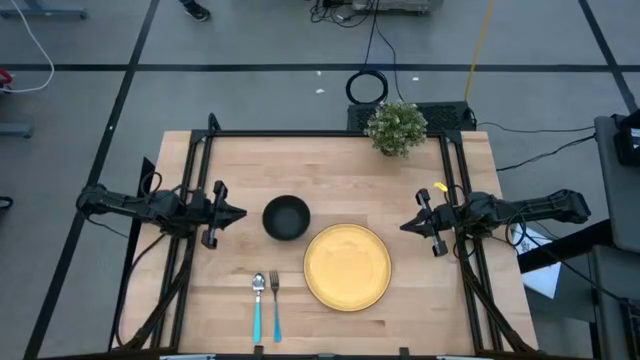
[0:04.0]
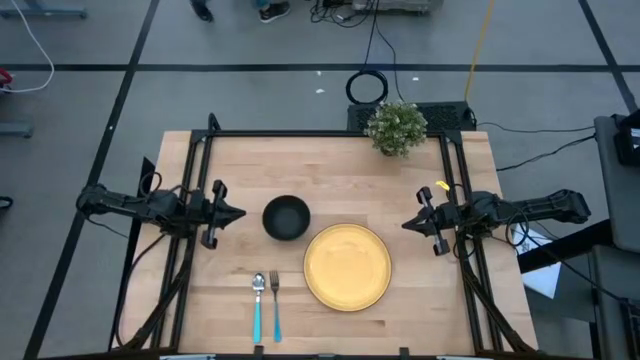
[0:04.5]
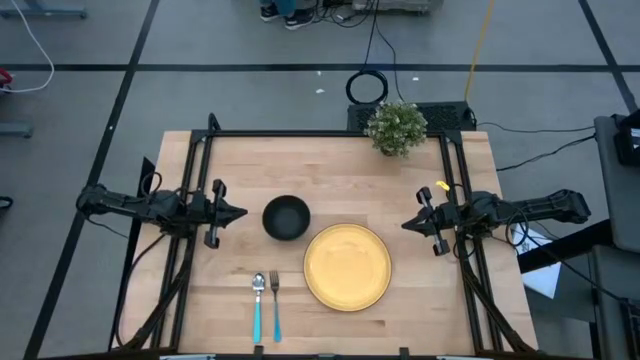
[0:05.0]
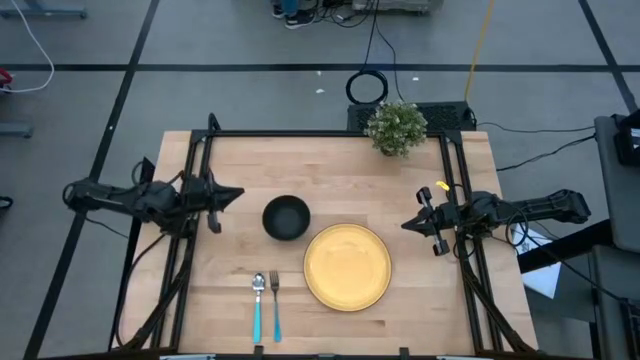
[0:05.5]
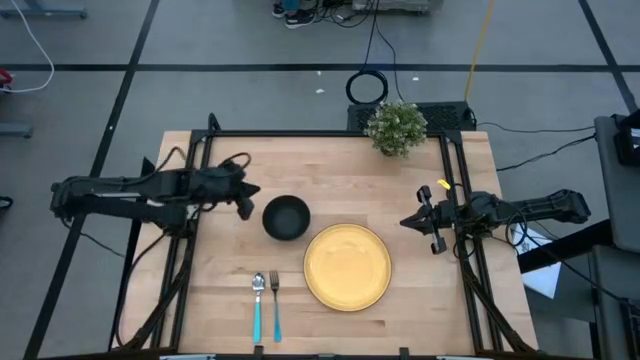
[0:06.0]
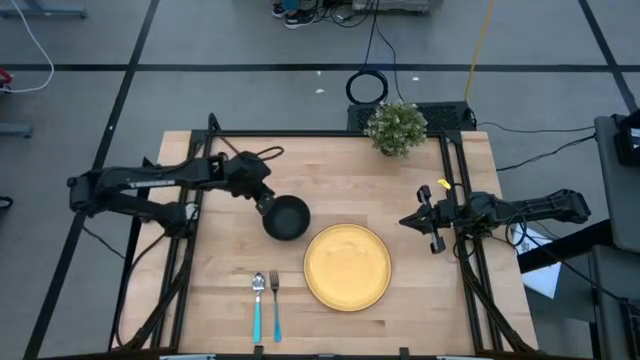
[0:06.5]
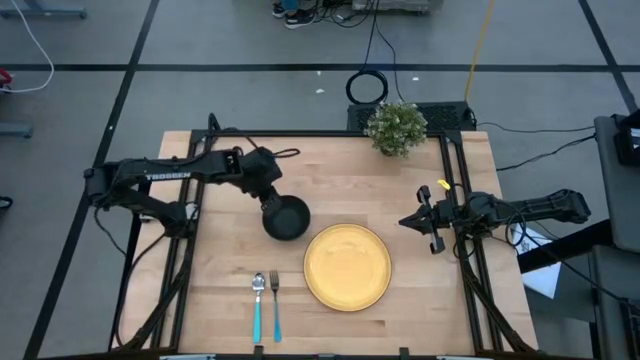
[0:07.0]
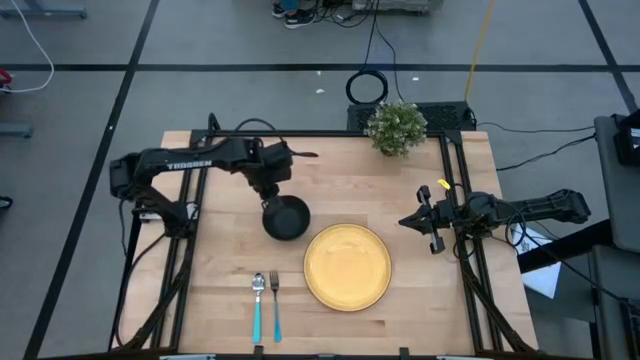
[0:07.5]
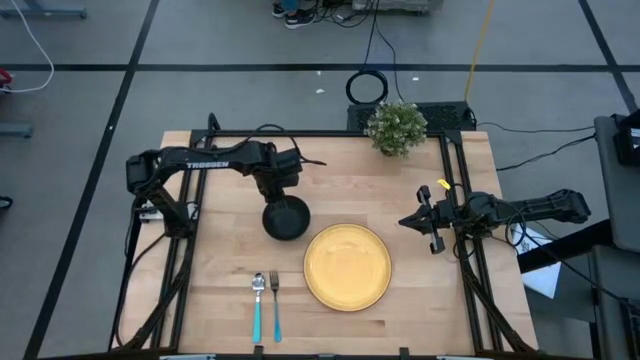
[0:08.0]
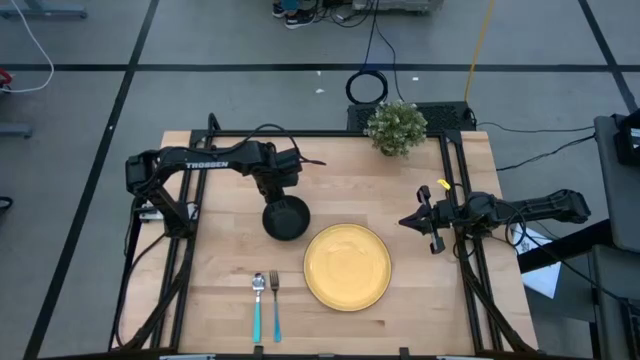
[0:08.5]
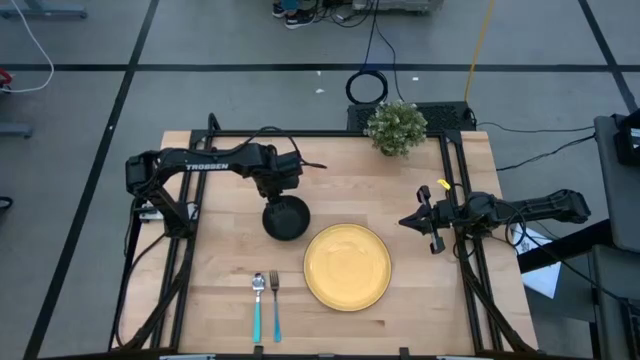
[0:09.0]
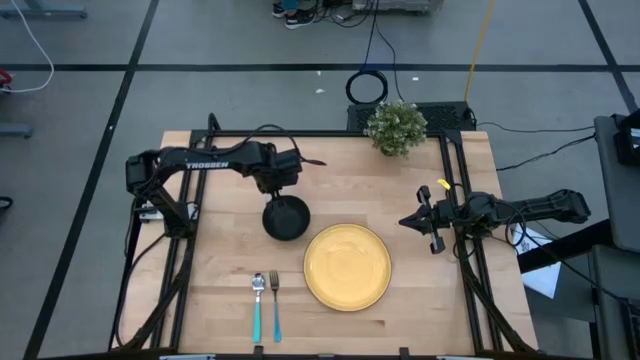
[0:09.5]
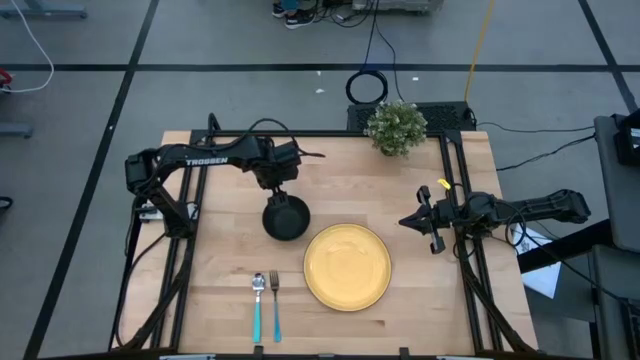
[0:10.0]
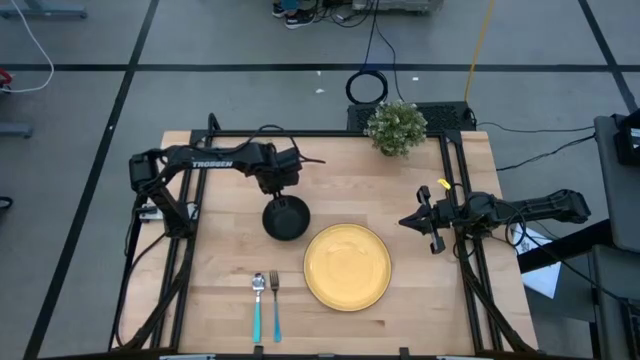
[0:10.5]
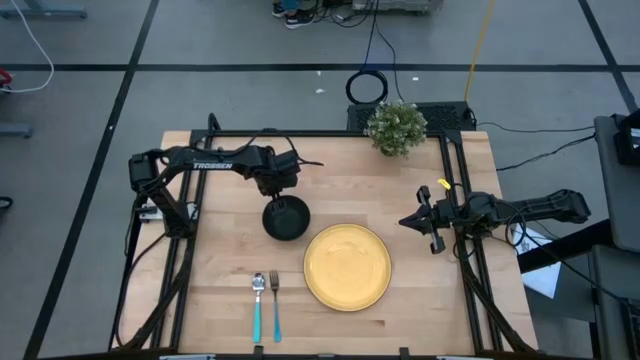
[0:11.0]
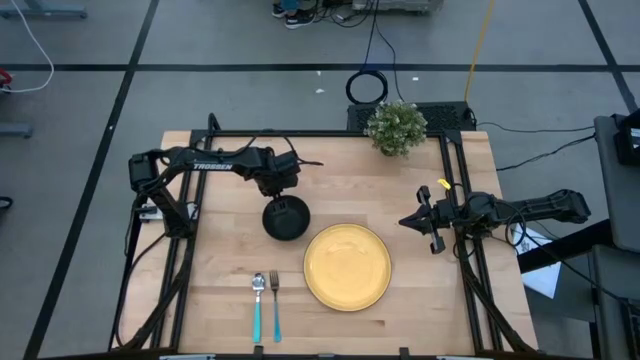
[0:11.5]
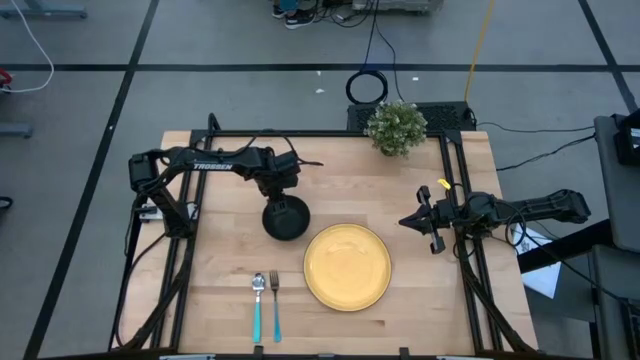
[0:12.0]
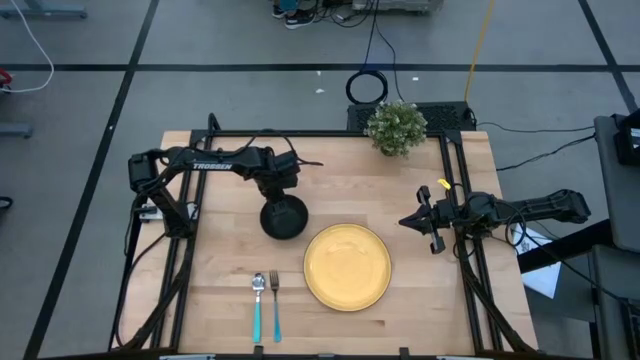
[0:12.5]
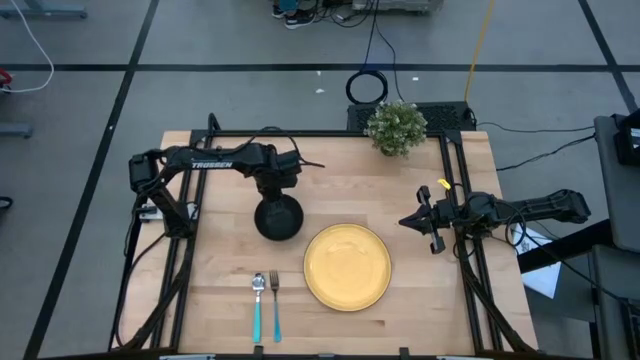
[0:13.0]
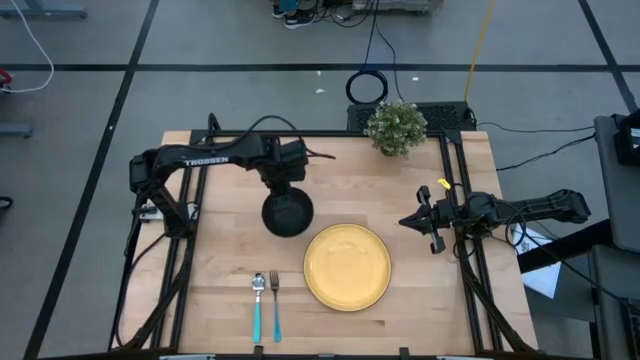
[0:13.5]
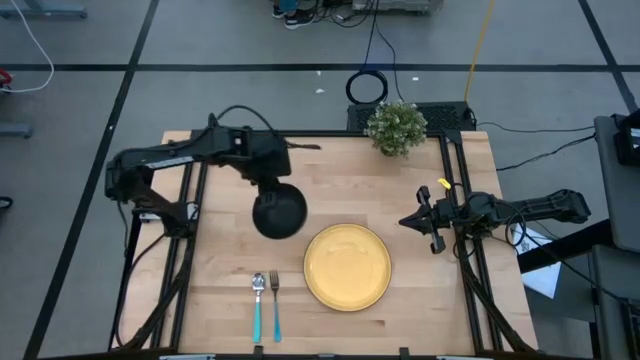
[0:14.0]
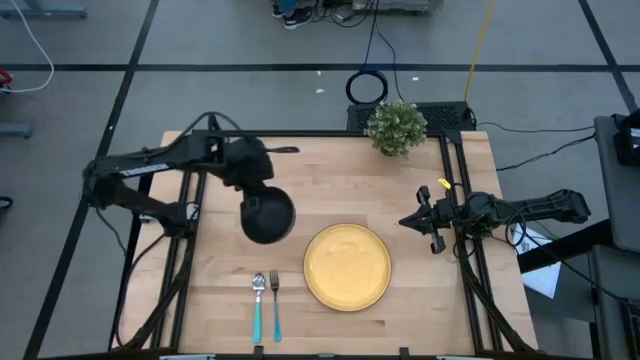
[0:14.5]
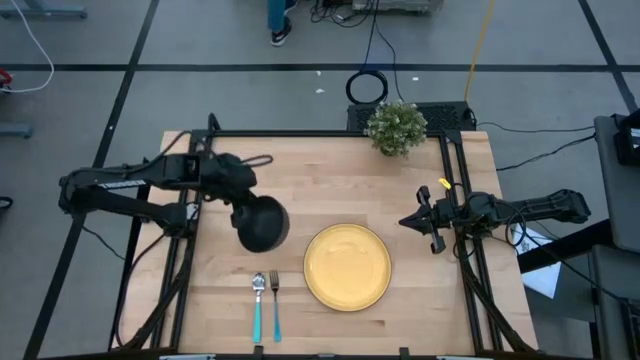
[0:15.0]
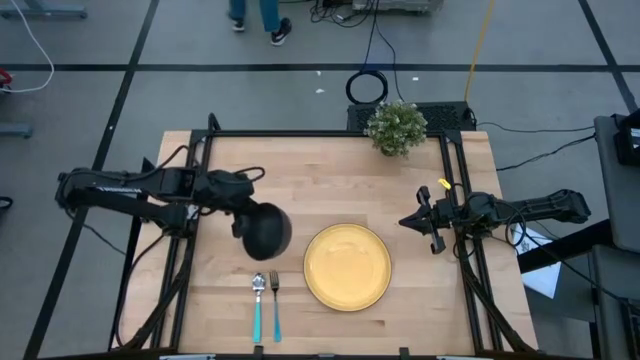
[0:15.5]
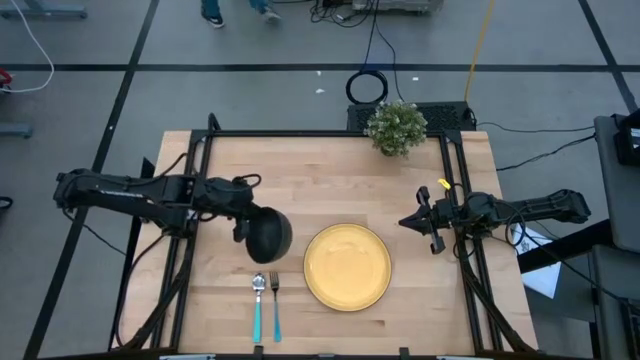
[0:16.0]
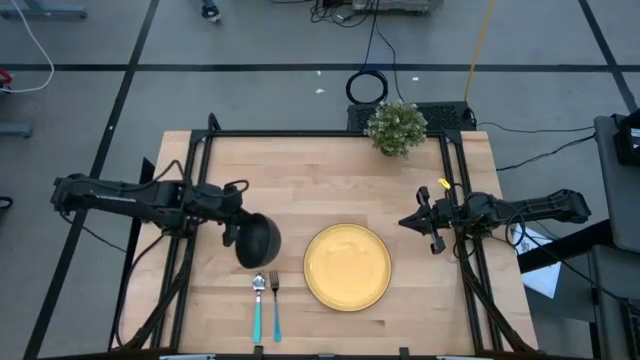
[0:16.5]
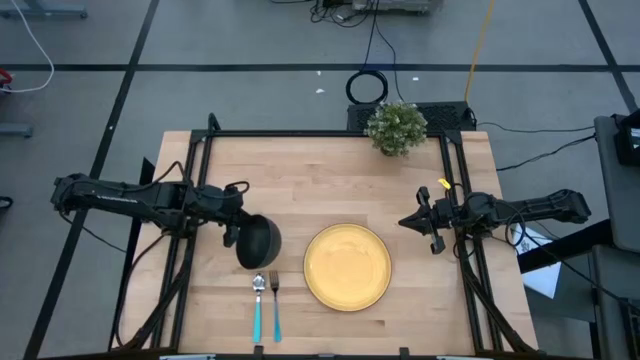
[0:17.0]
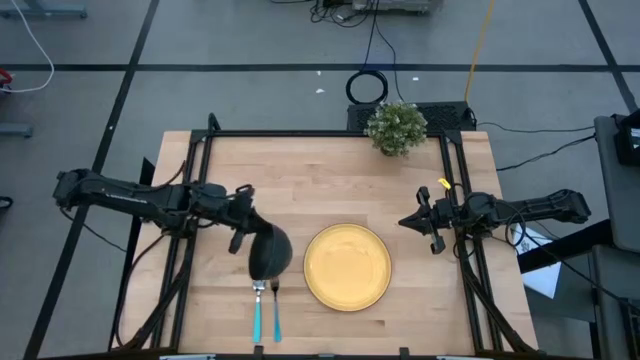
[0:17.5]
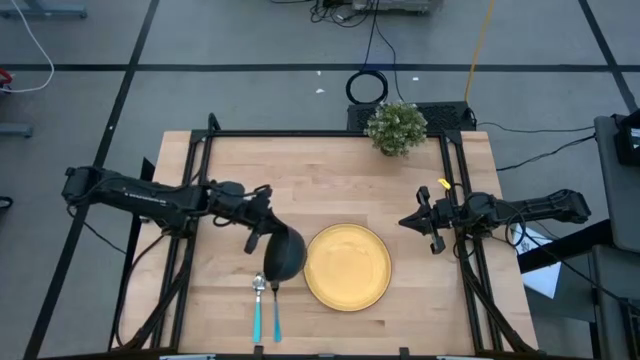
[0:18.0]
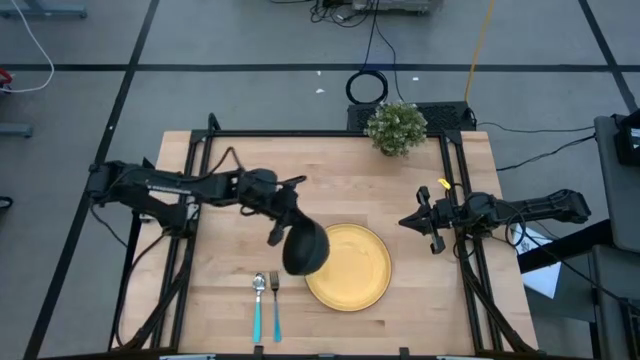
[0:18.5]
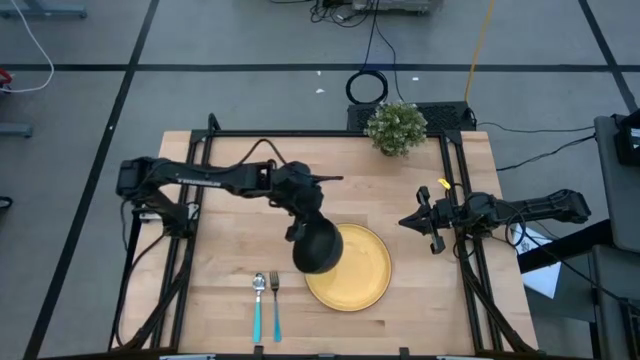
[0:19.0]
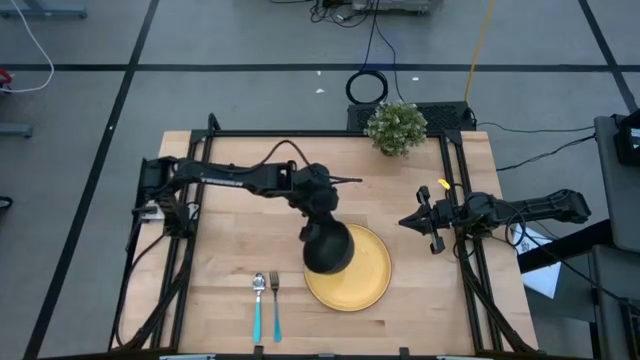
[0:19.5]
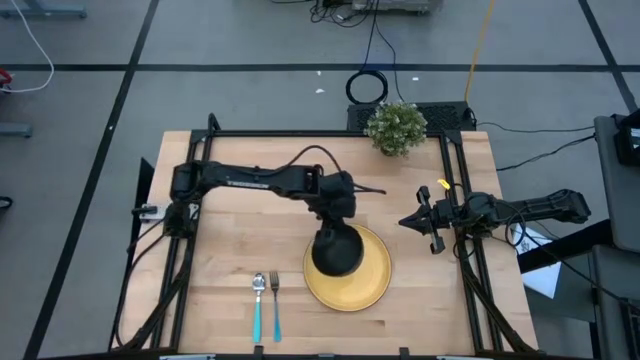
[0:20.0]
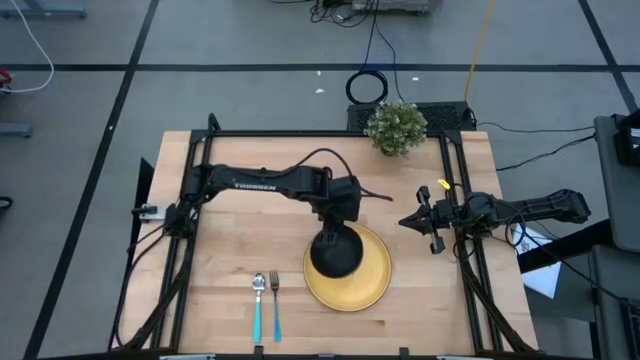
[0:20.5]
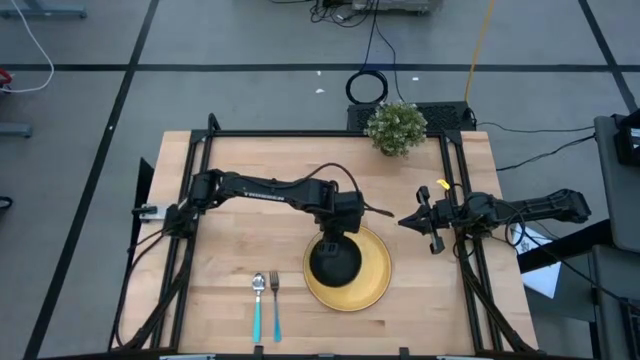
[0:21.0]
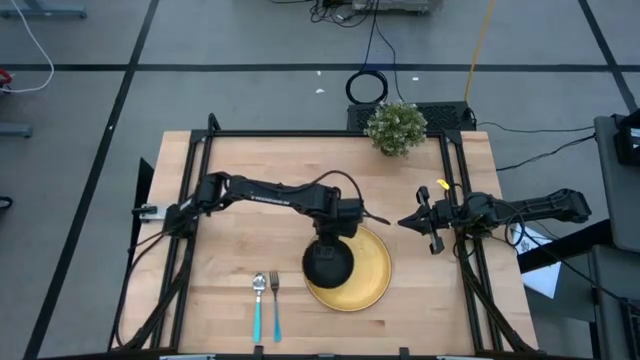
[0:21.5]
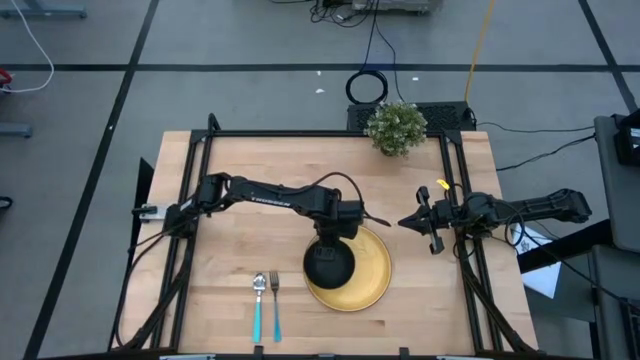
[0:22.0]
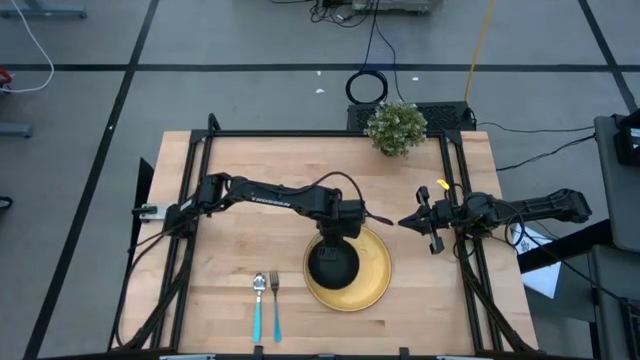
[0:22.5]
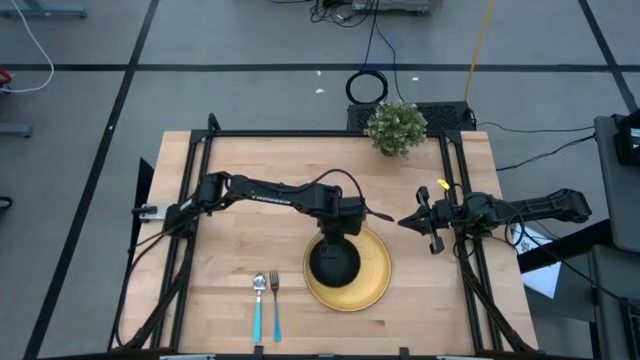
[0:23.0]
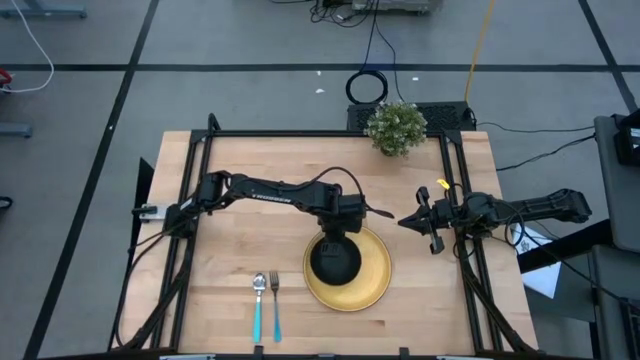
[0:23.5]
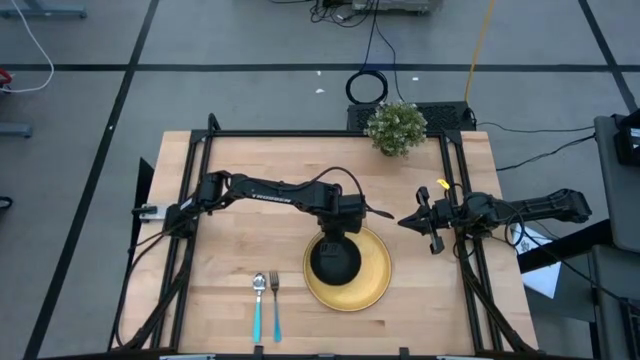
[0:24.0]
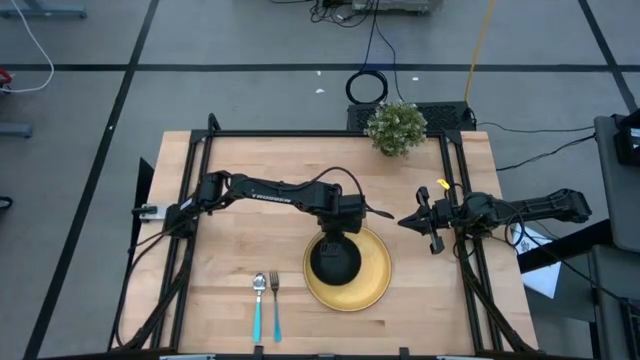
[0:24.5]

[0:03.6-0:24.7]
Task: Set table place
Put the black bowl on the yellow plate
